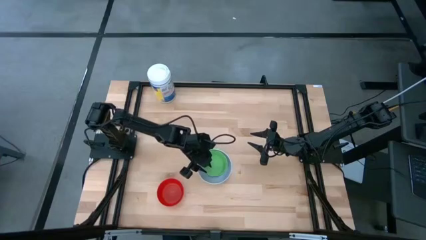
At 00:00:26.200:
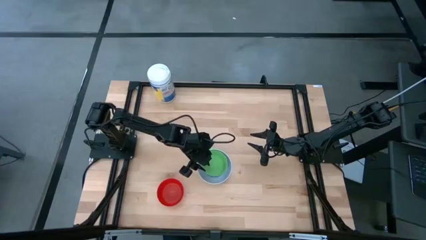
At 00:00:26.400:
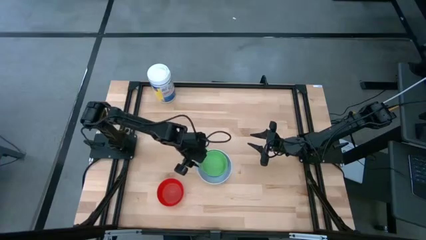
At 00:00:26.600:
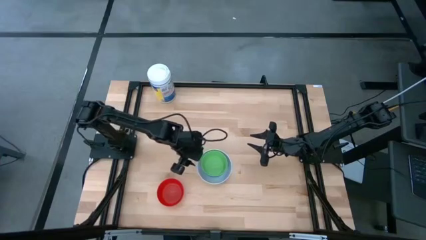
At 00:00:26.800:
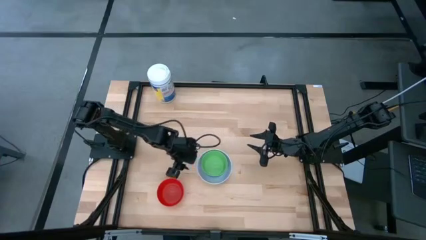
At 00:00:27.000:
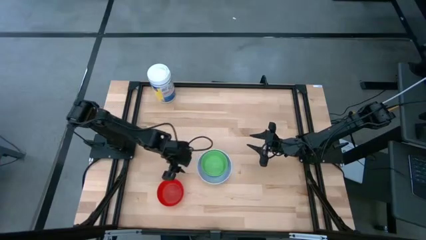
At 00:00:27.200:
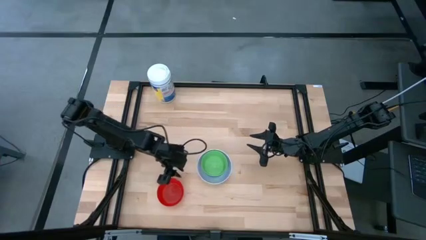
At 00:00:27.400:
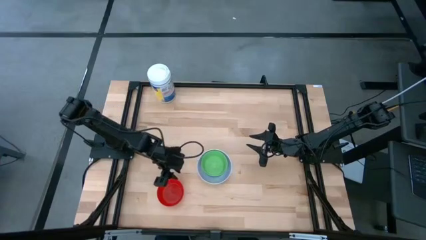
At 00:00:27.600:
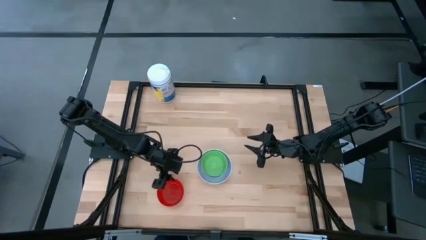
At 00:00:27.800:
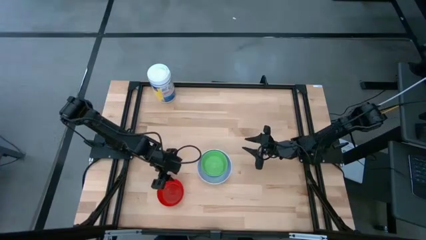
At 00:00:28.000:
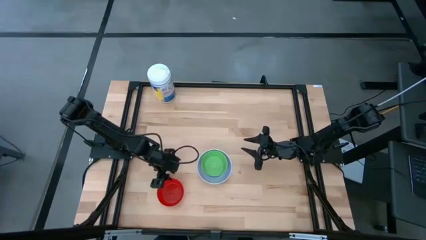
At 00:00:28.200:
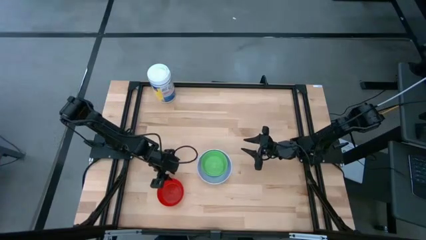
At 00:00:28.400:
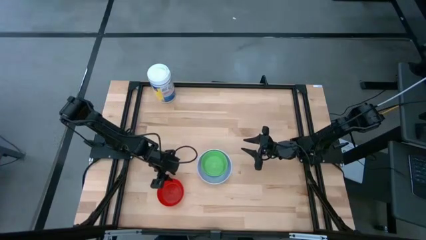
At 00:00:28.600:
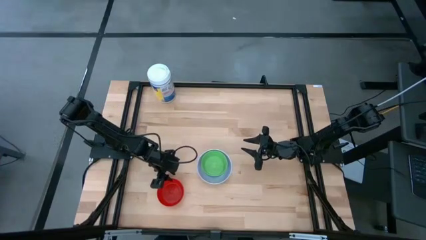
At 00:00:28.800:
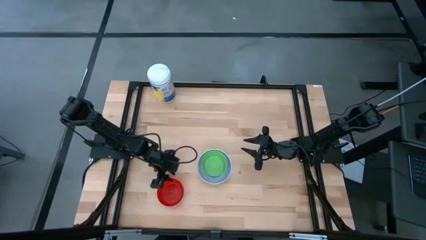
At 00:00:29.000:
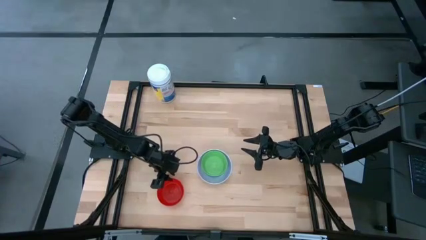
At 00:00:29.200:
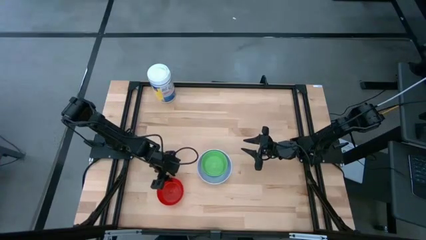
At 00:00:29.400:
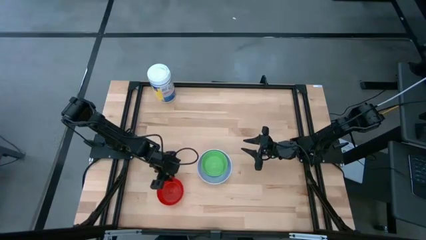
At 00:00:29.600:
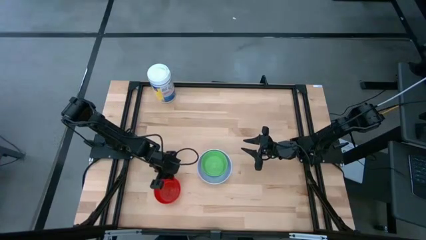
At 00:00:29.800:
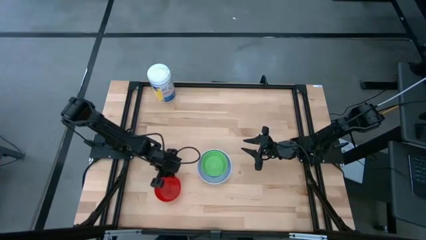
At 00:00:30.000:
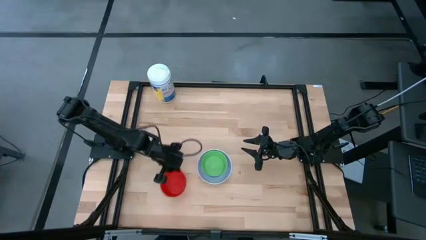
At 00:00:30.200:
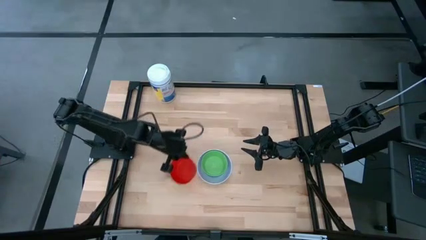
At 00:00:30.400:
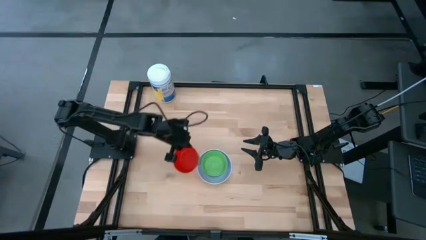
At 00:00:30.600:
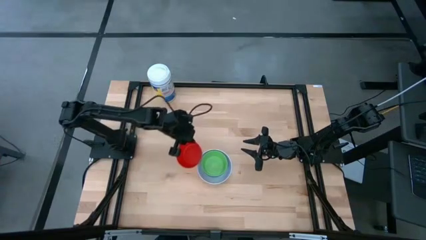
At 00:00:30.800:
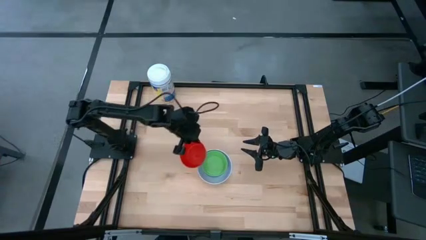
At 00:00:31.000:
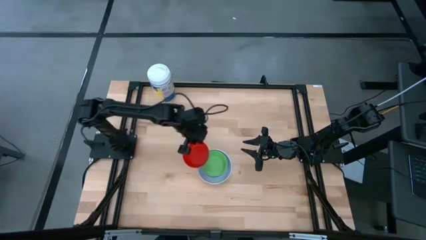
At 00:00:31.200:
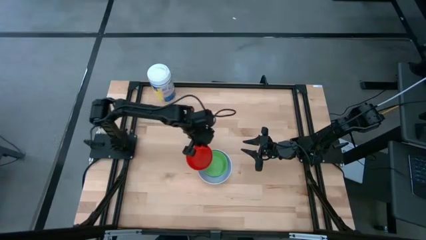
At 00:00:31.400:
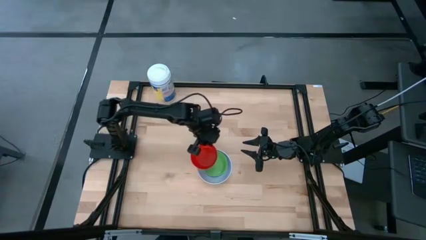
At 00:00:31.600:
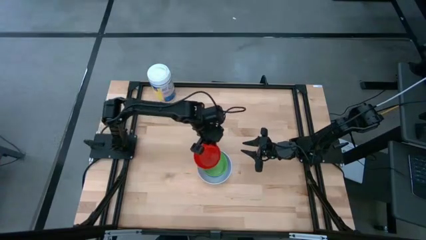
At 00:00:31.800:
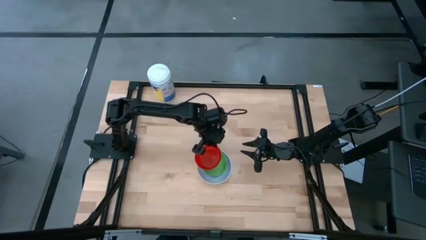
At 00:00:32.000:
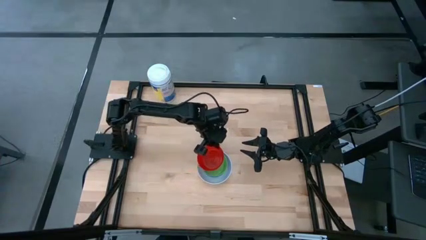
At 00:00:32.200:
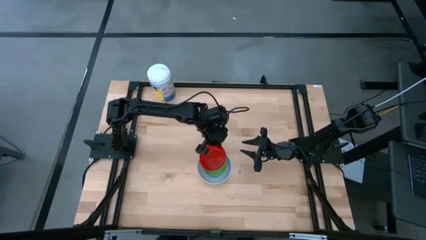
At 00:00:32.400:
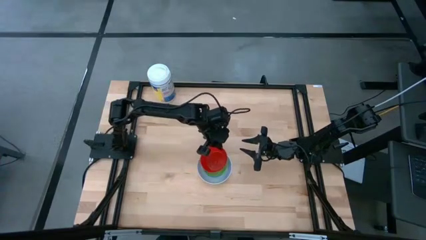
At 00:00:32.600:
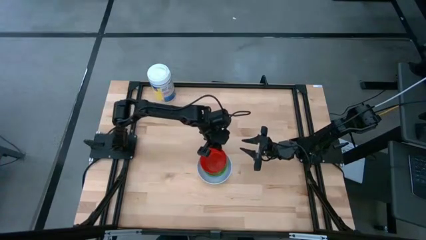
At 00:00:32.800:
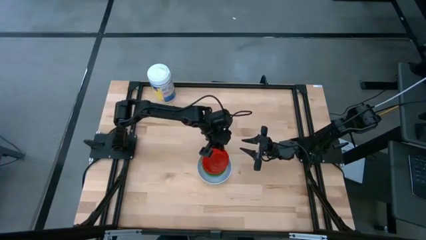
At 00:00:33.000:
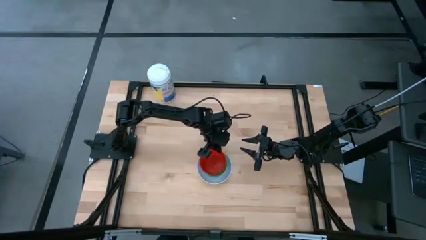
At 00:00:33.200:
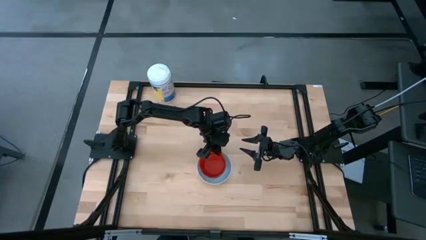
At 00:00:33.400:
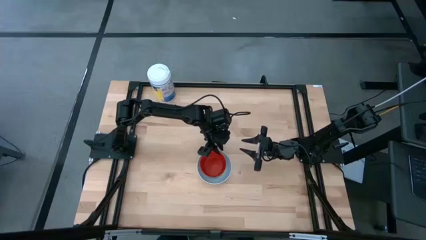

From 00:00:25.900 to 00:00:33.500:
Stack the orange bowl on the green bowl

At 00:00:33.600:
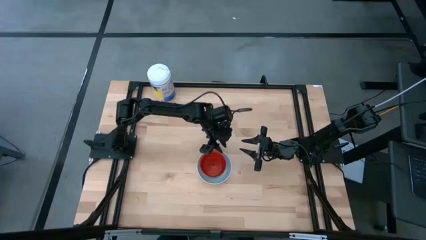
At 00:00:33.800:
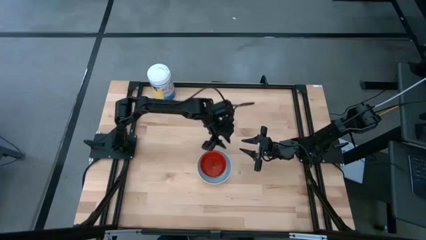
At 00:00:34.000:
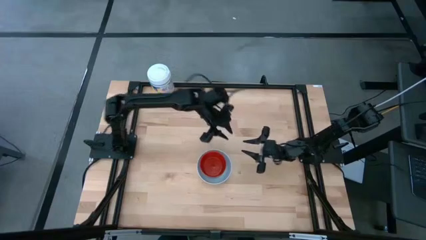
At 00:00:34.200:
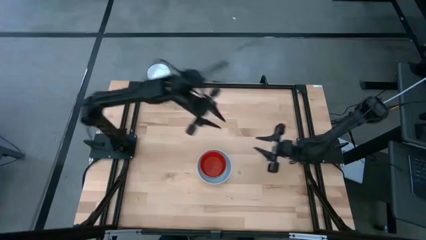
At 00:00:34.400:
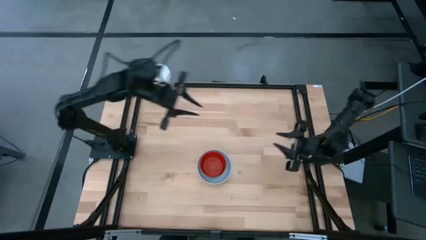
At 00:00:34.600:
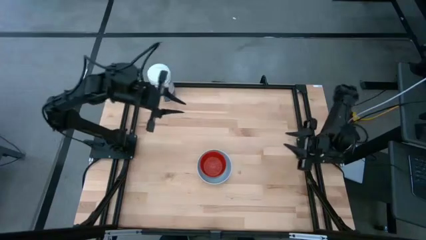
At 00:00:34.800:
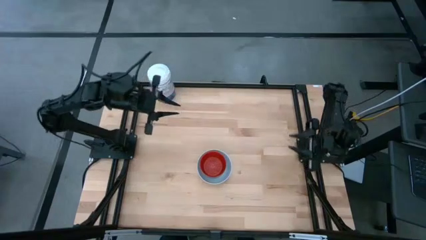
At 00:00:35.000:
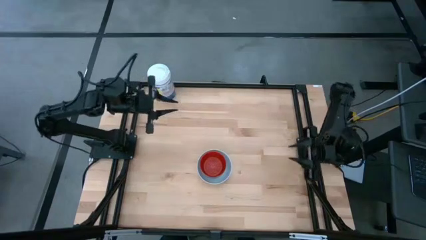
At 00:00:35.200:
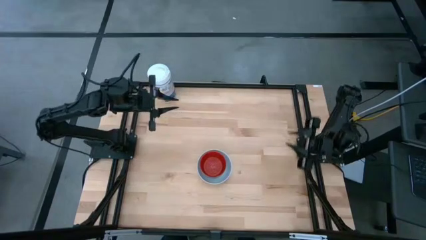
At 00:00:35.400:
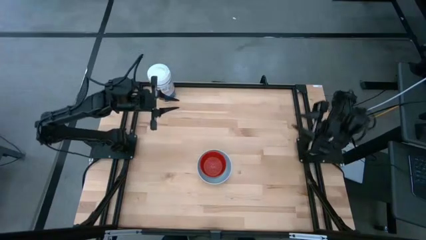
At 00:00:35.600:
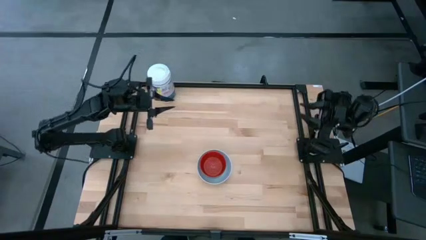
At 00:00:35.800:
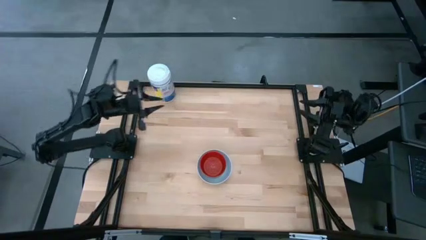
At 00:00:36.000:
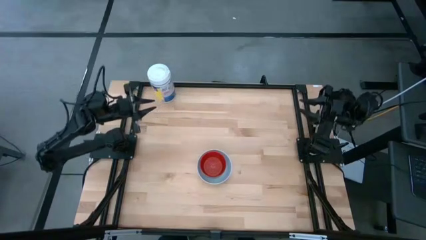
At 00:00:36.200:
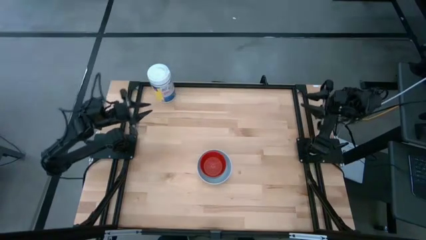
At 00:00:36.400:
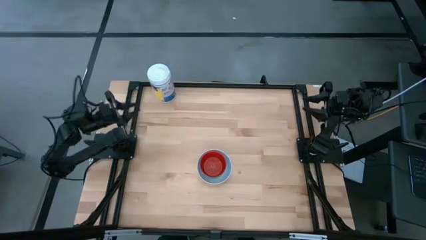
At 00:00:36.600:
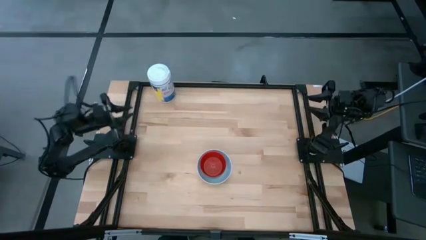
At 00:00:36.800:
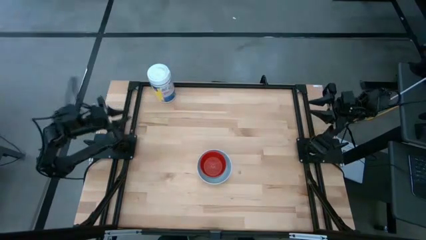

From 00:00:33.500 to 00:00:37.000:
Return to Home Position

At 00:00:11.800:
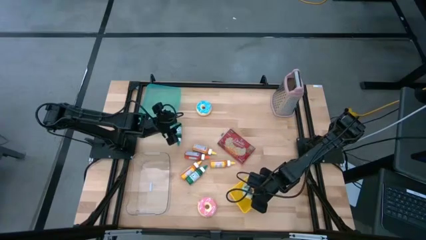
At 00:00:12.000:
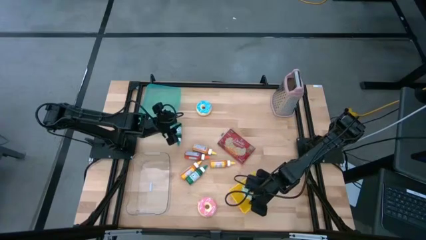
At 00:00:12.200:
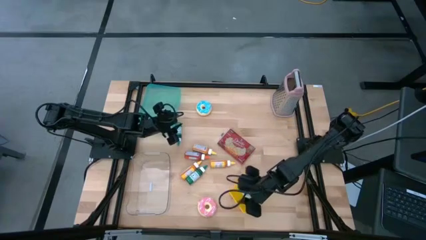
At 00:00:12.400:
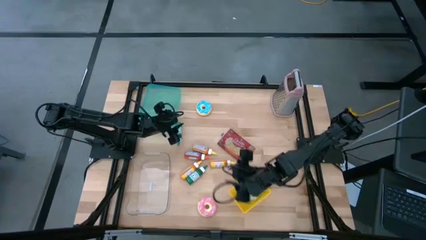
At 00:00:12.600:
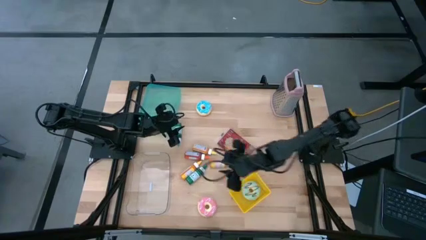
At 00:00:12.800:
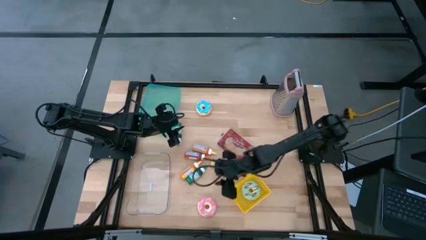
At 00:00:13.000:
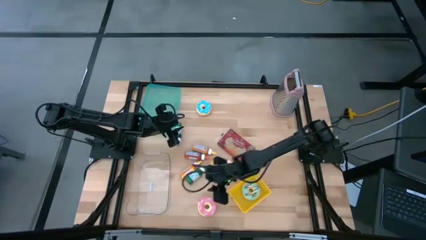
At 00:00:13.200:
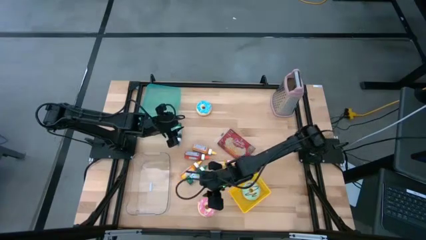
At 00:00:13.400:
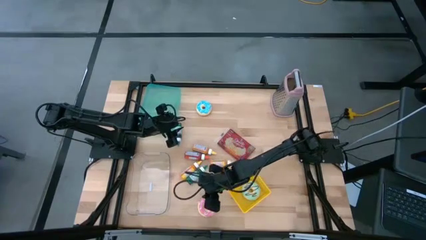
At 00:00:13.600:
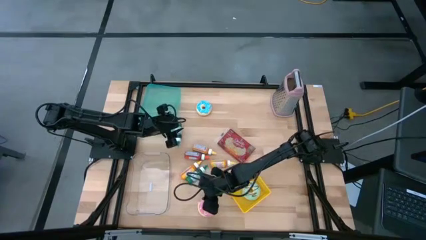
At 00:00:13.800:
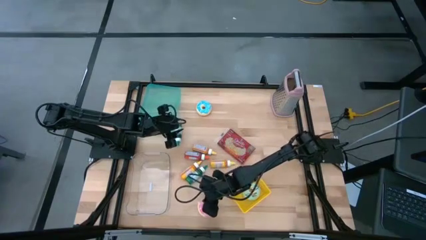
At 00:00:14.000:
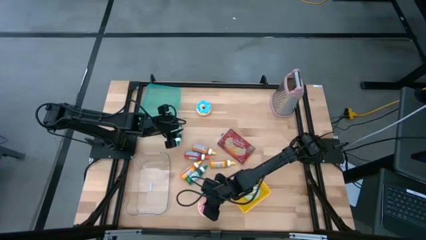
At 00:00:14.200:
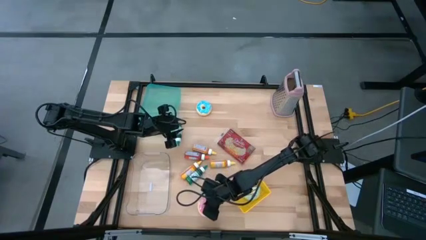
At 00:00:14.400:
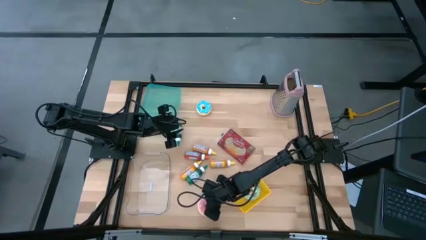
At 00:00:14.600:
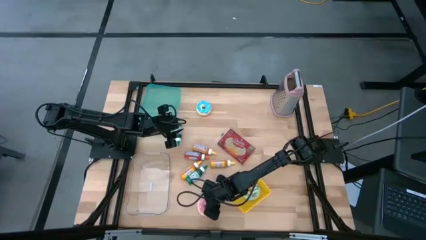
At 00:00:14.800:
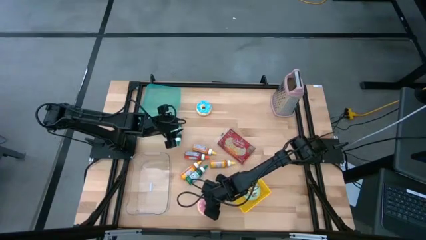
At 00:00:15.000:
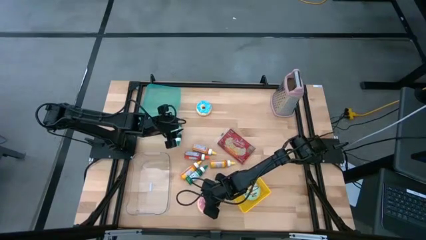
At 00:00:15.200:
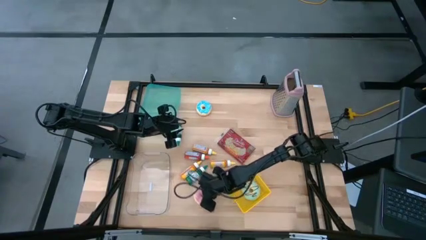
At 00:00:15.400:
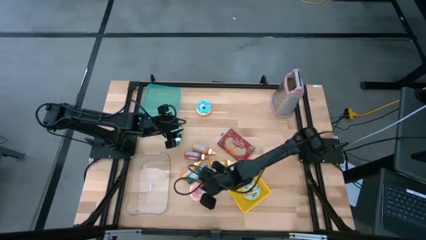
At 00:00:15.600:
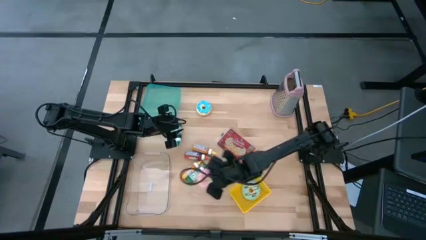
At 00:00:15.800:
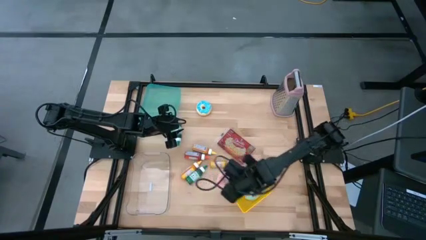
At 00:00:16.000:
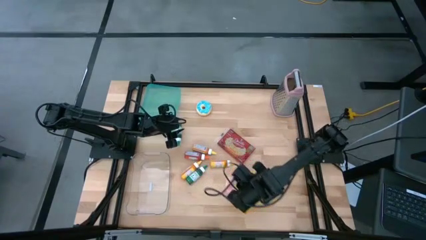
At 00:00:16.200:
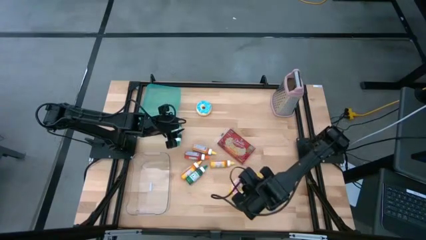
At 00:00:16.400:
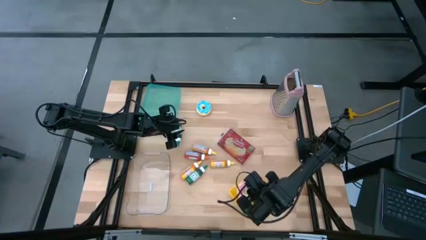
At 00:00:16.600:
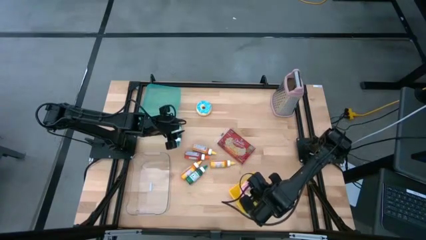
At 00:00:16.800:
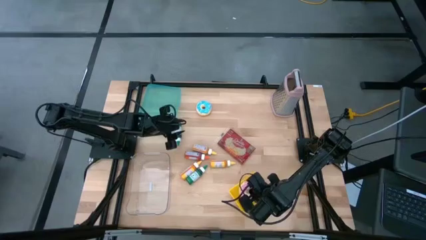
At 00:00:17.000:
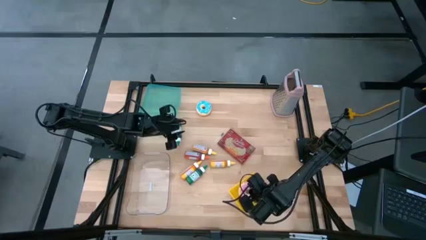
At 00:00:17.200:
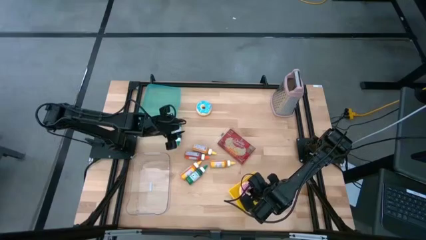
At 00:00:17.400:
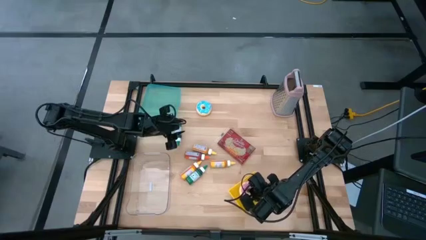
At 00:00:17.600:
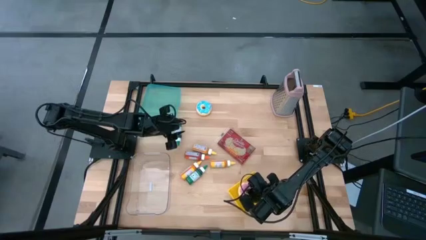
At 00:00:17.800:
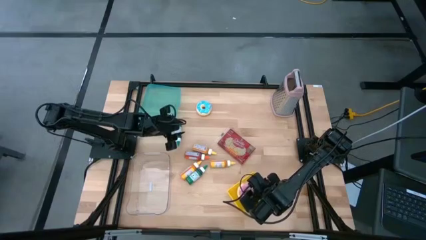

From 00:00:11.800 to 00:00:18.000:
Put the pink donut into the yellow bin
